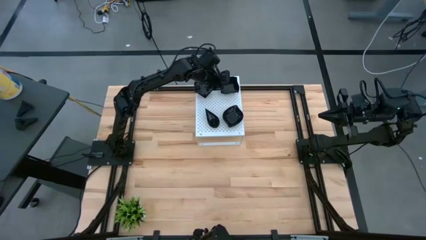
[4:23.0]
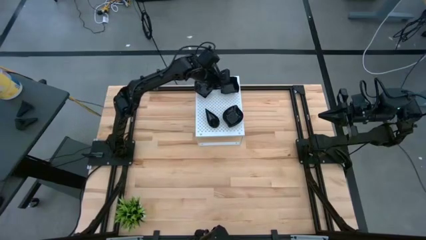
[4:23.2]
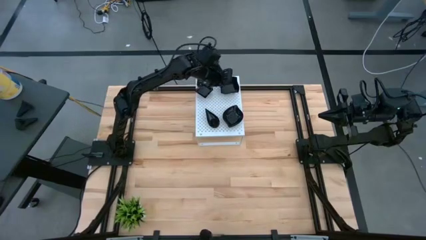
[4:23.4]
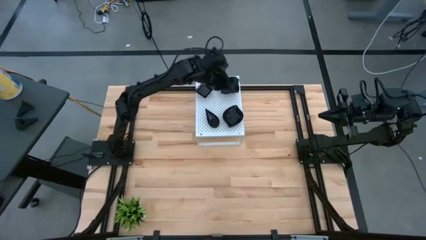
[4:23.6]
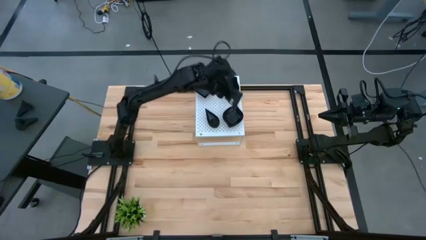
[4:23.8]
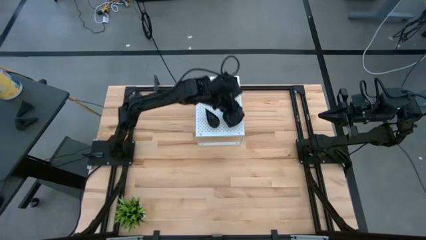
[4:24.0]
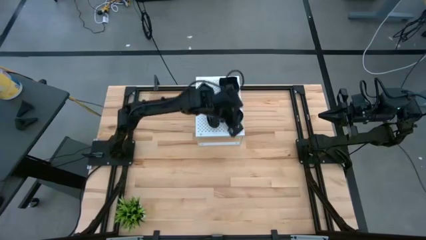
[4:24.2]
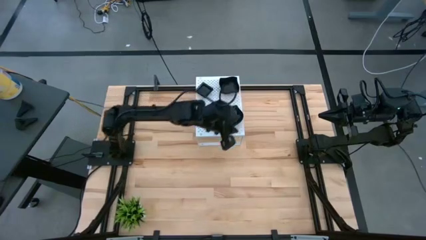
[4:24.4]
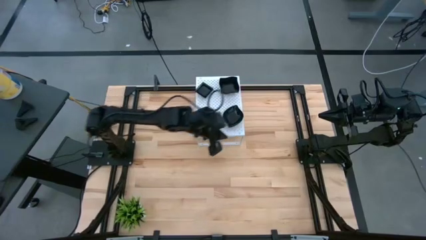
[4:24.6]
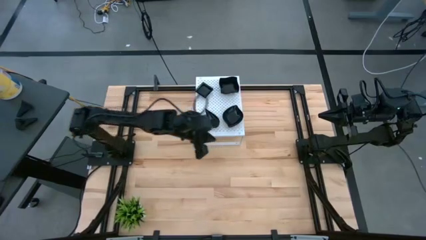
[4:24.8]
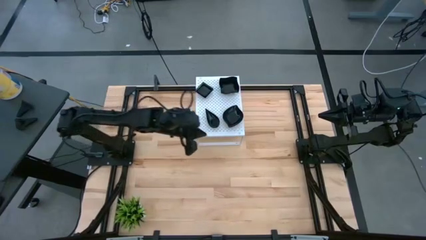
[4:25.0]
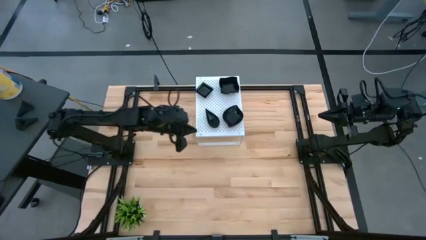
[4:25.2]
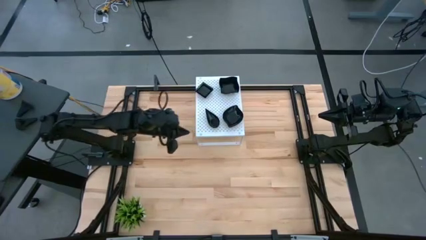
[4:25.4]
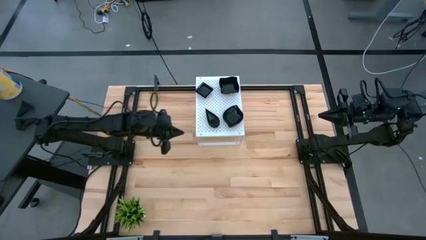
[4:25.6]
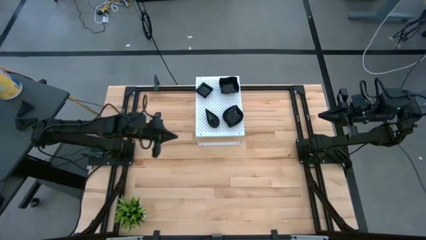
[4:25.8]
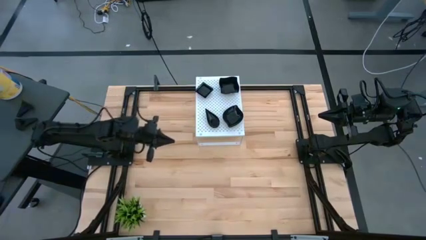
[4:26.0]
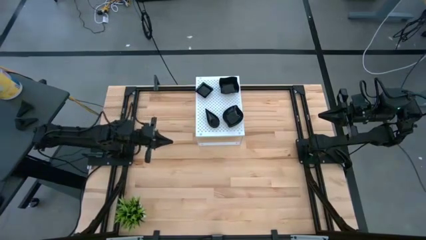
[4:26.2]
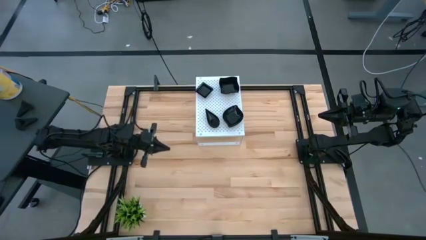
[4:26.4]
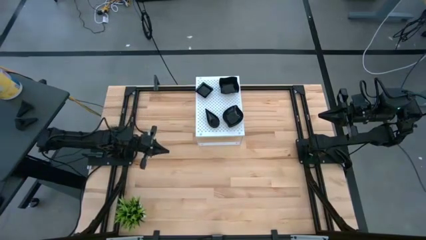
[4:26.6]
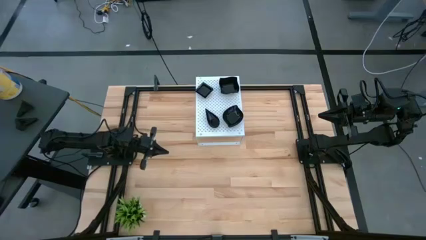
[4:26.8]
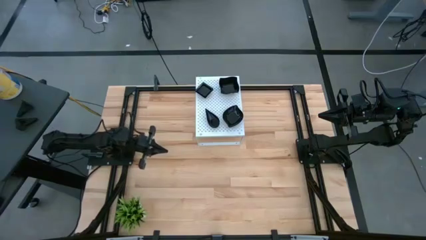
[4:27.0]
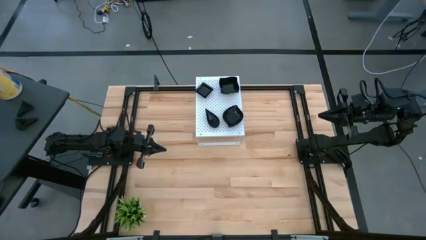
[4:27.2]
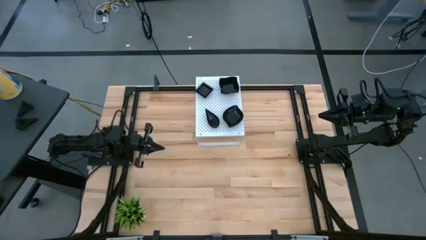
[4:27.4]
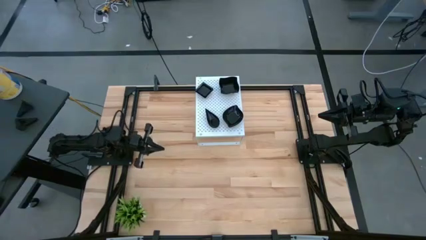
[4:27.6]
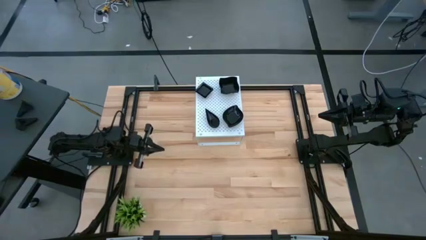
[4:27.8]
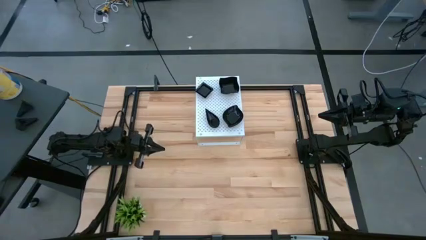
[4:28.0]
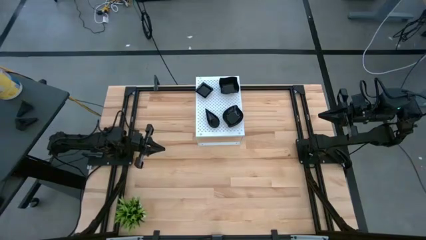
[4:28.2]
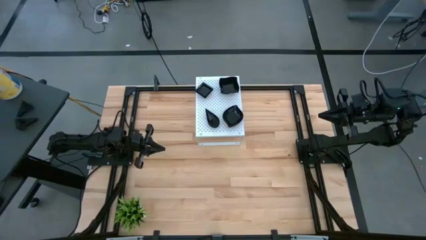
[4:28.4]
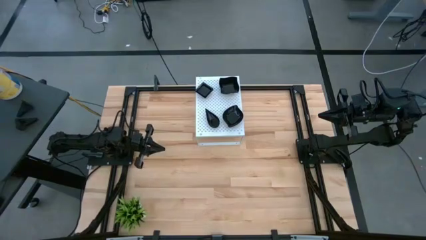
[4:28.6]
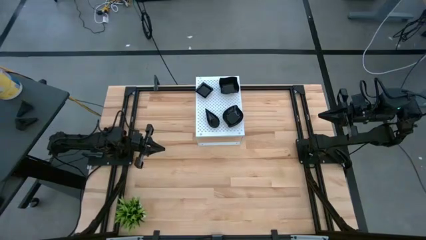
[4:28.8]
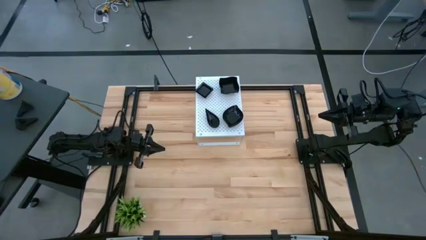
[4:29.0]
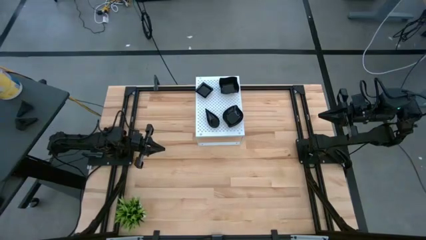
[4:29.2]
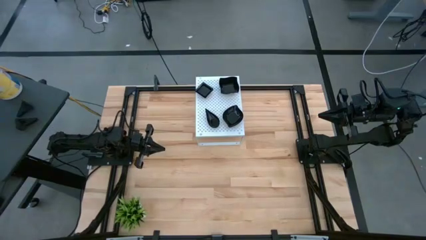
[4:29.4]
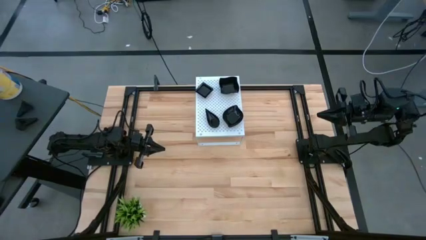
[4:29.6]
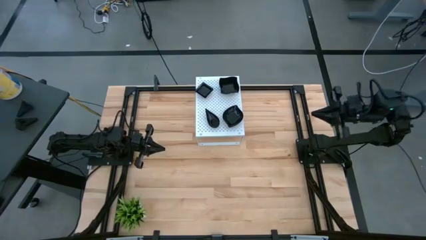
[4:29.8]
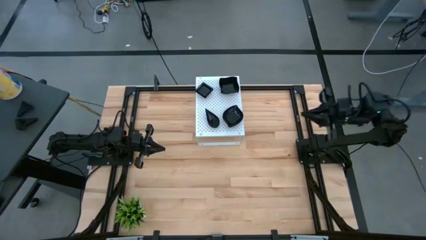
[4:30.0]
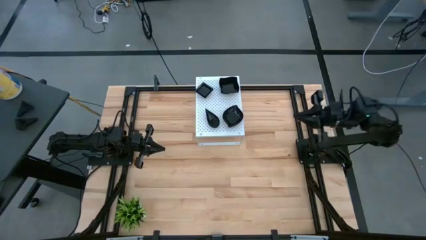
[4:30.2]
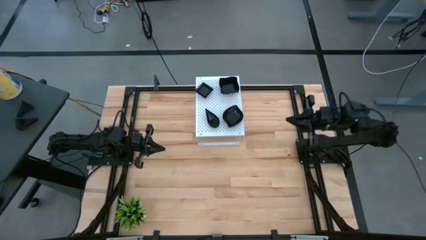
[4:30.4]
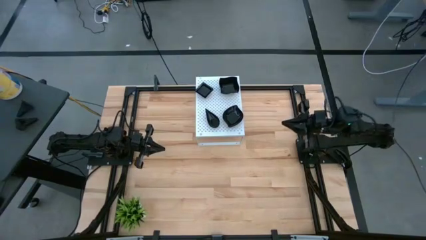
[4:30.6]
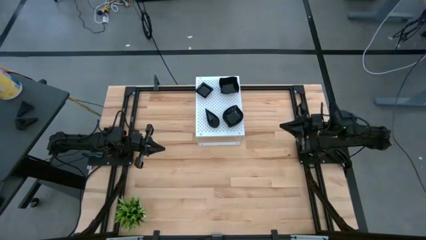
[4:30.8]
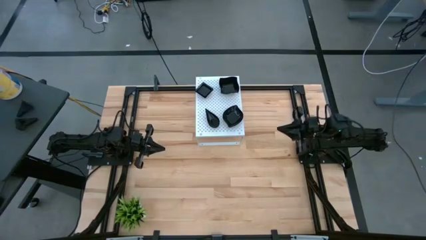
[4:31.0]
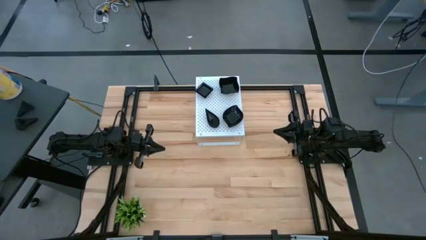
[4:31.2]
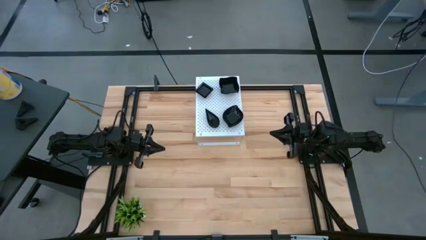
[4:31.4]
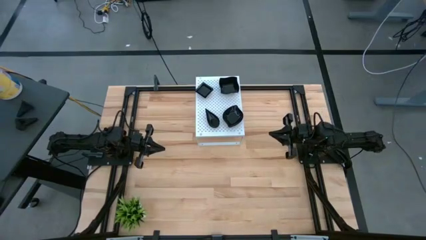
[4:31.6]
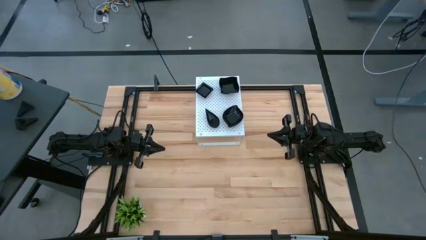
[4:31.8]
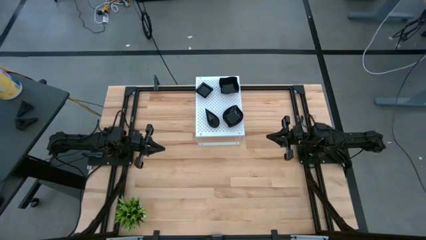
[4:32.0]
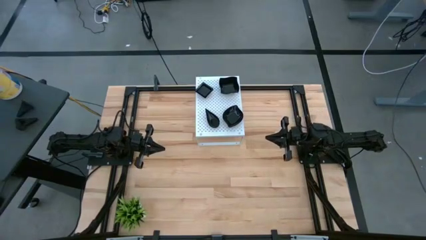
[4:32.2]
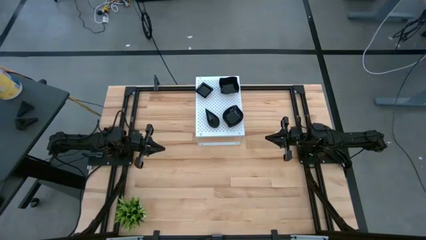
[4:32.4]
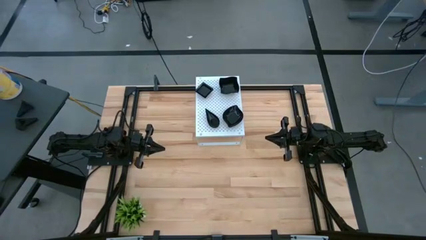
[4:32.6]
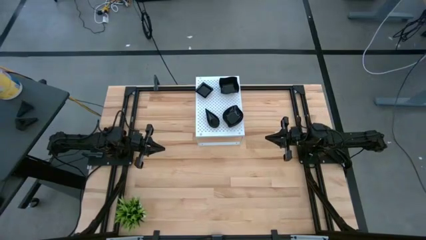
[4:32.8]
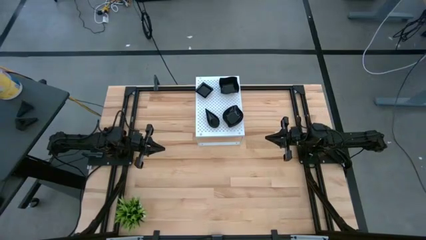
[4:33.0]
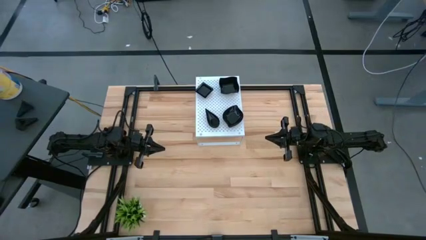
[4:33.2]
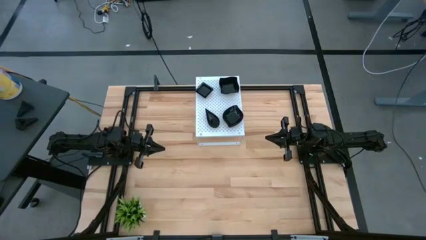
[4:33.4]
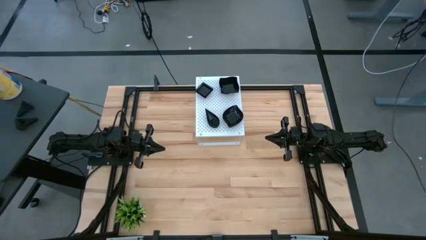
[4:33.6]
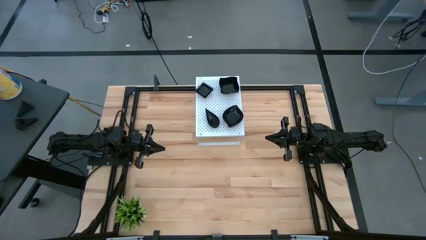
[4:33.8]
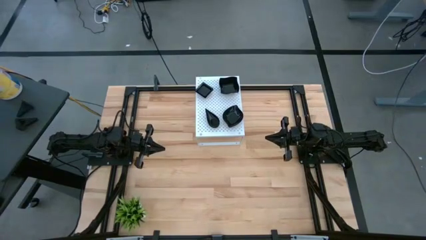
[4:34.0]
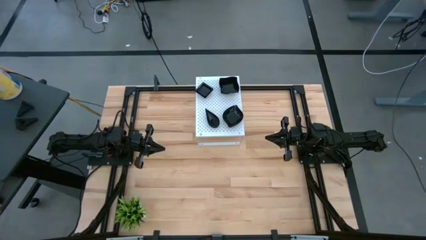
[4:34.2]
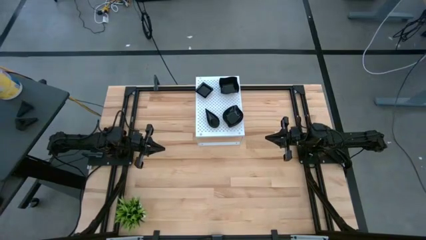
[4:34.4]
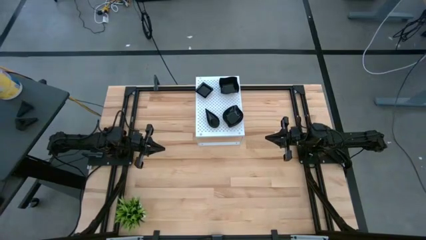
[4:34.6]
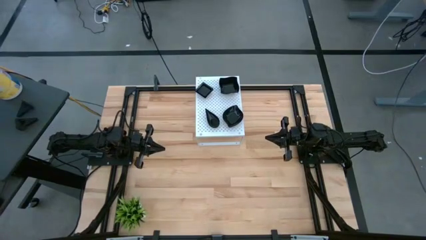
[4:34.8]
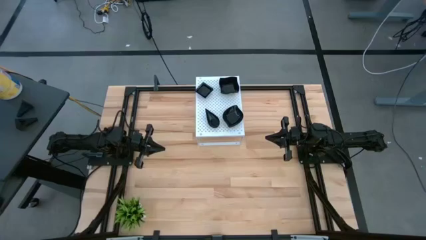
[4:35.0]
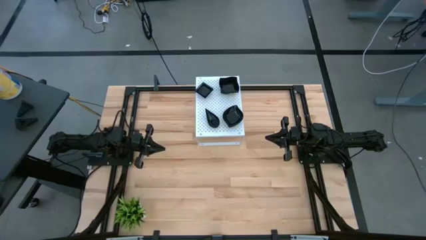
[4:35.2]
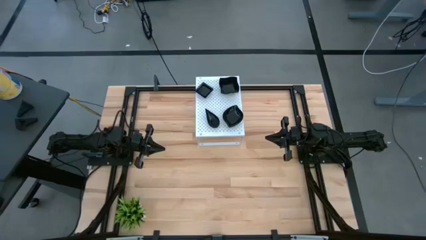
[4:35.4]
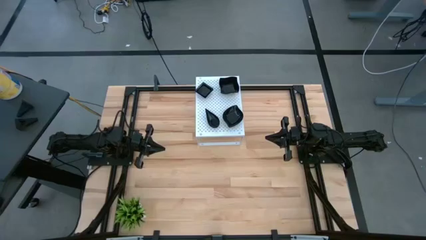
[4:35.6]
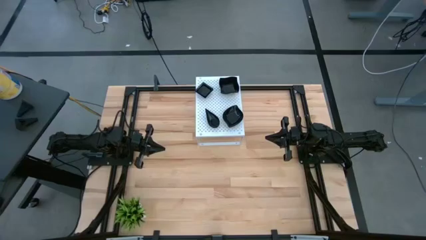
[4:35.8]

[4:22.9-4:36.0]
Task: Pick & Place Mini shaped plates
Return to Home Position
